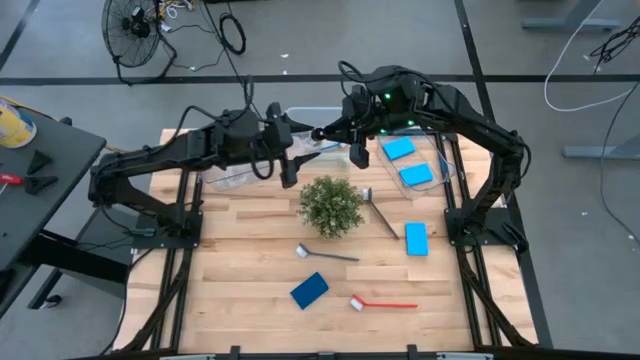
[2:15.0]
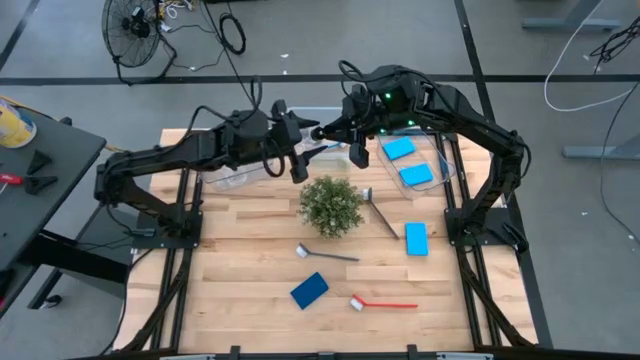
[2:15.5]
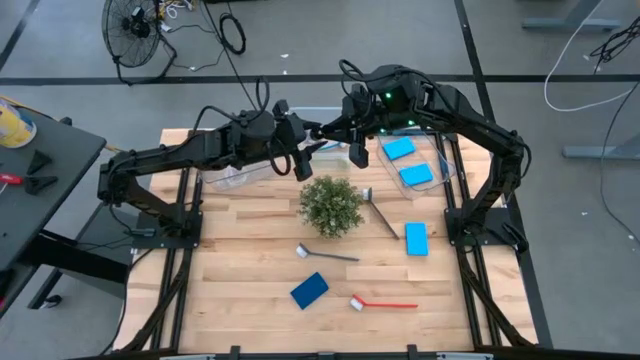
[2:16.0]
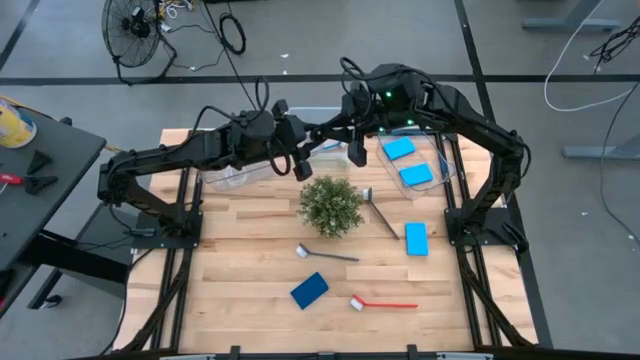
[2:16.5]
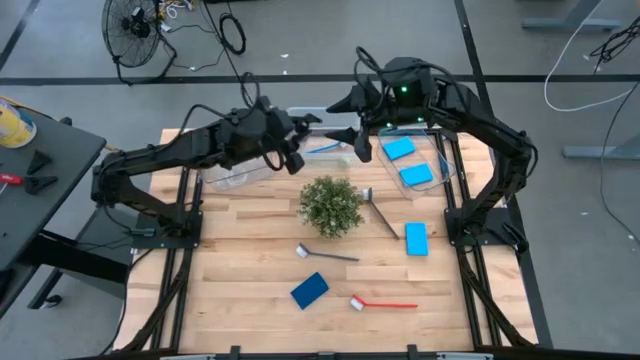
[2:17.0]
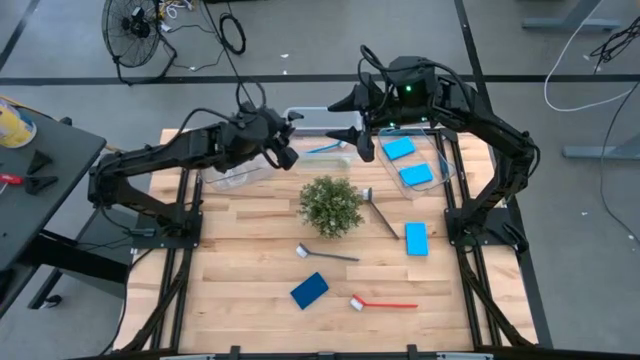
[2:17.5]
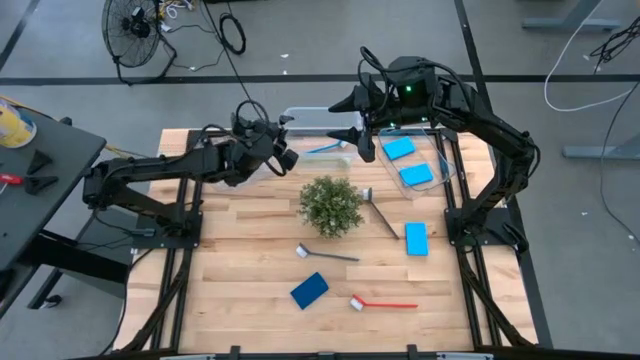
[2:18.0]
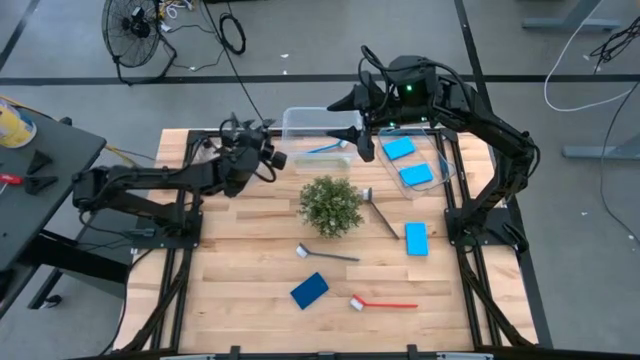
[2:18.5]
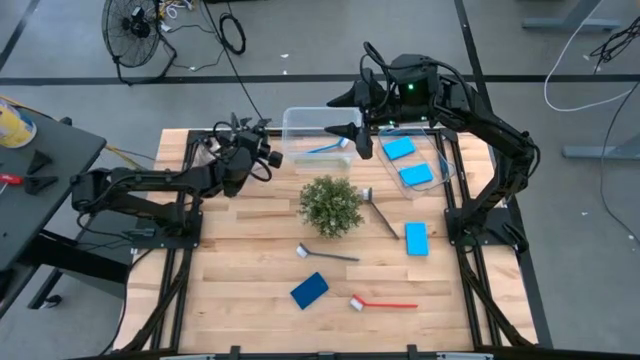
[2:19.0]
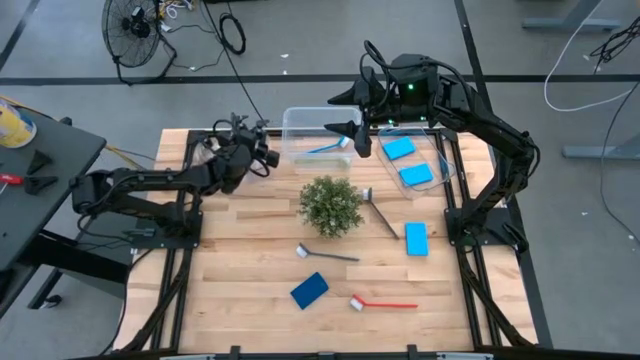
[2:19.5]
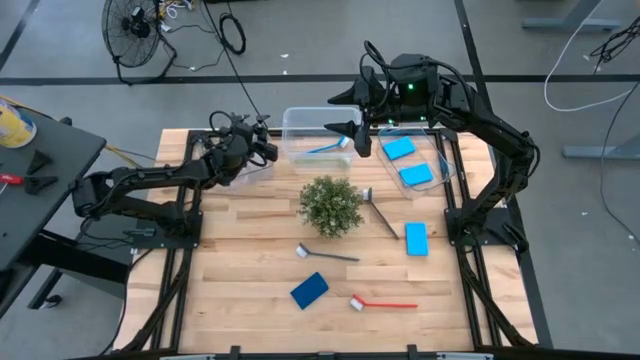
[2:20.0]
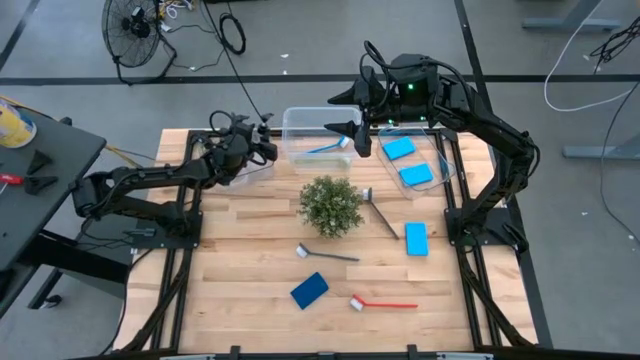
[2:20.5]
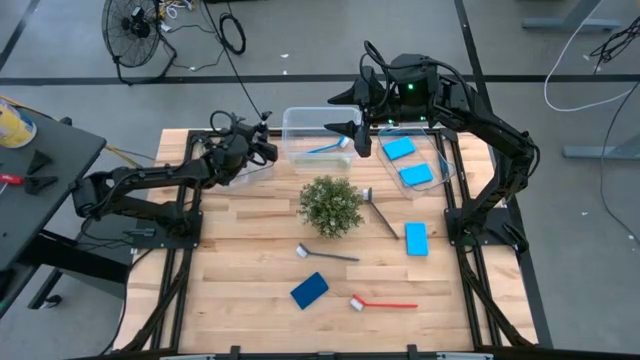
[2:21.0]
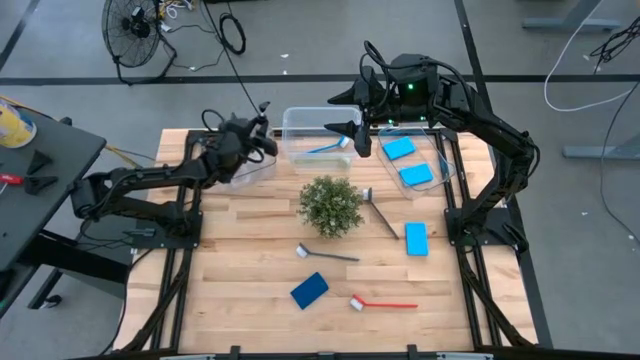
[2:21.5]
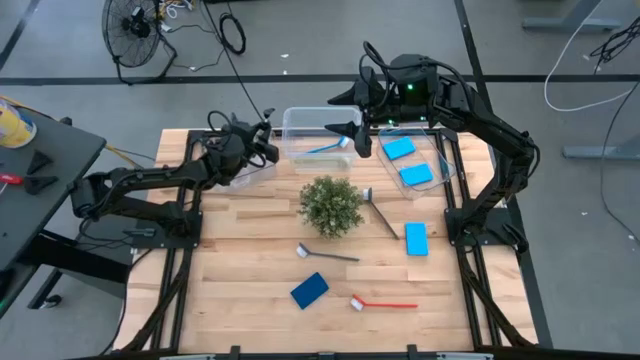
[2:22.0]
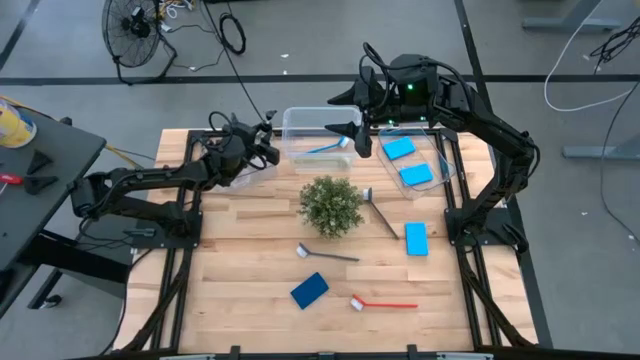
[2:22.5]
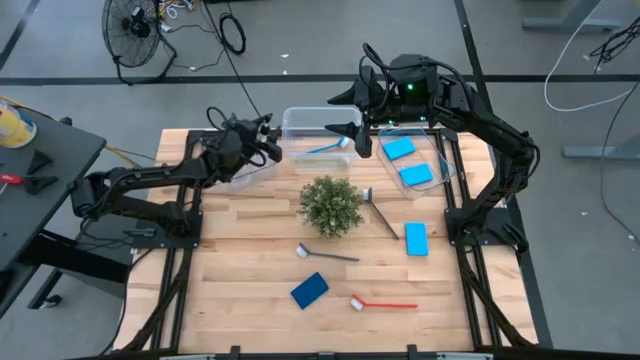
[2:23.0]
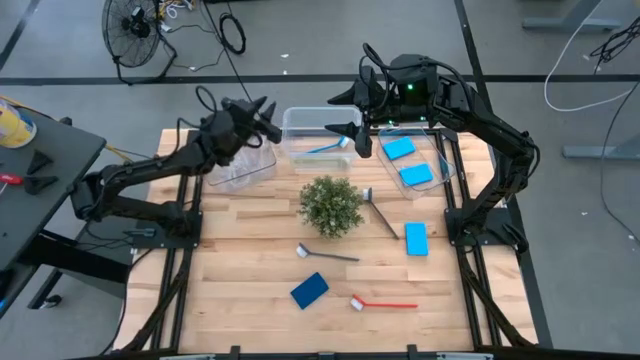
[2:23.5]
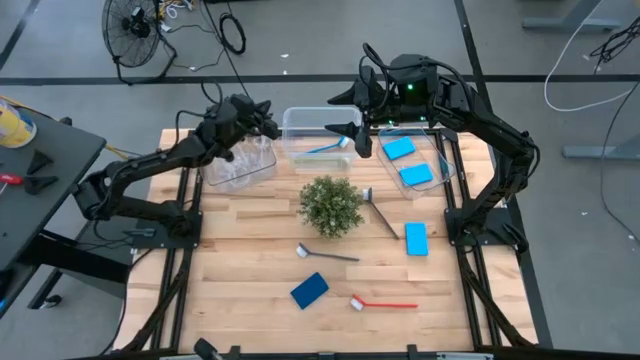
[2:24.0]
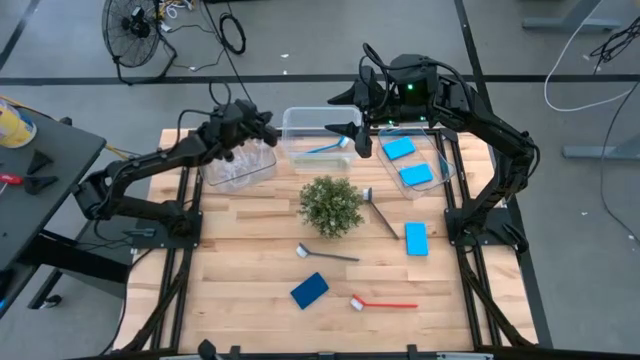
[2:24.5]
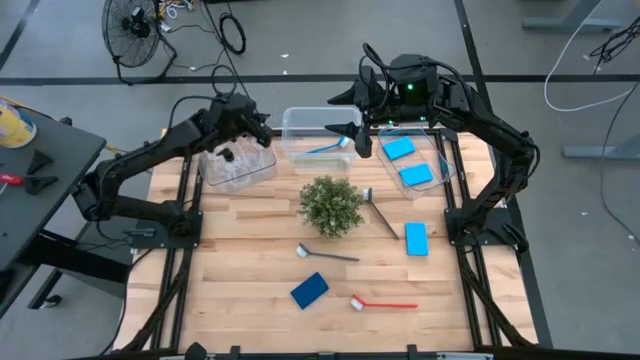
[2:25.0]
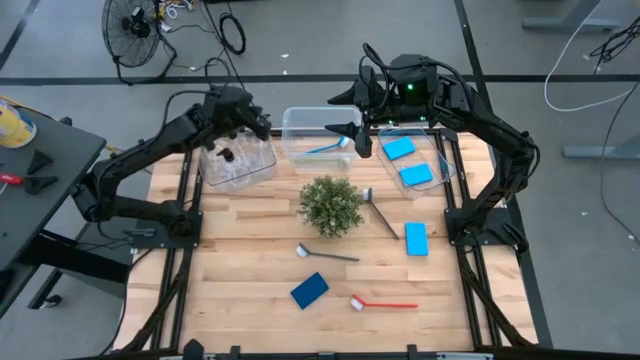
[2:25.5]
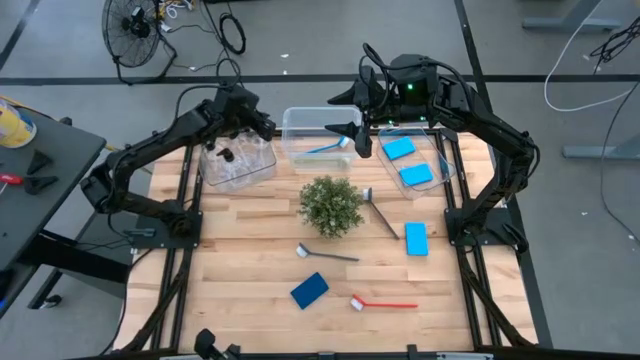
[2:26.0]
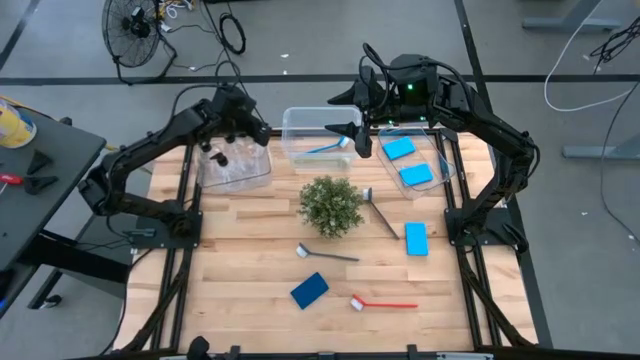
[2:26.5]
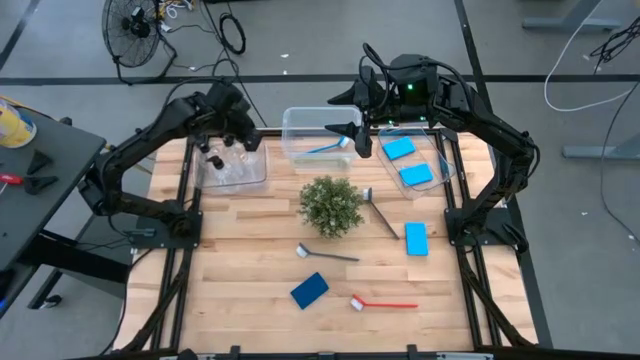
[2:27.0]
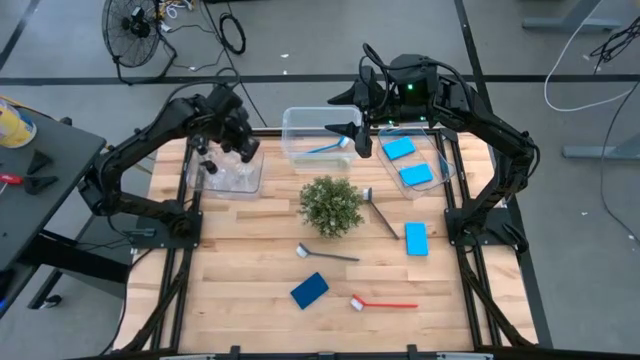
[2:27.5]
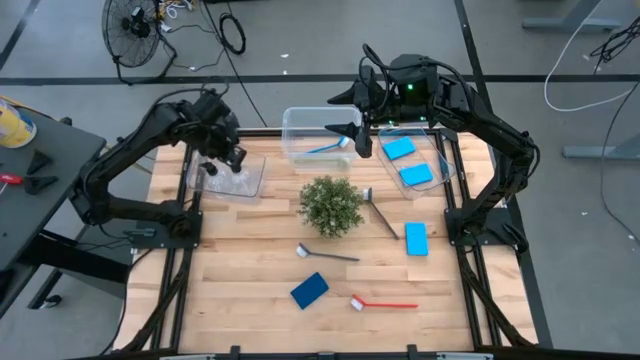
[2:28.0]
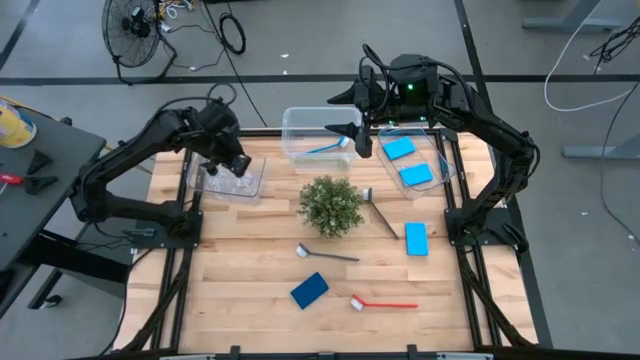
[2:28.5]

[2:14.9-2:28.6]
Task: Pick & Place Kitchen Sink Supplies
Put the transparent soap dispenser into the left transparent bin

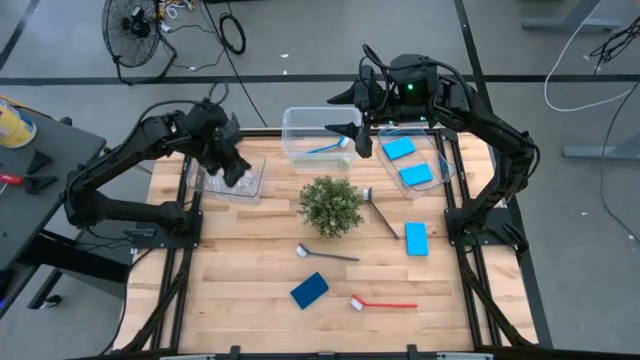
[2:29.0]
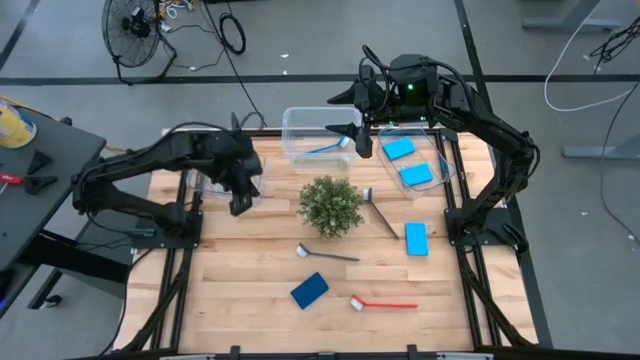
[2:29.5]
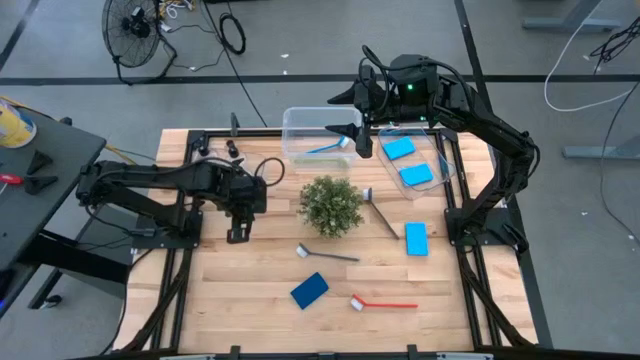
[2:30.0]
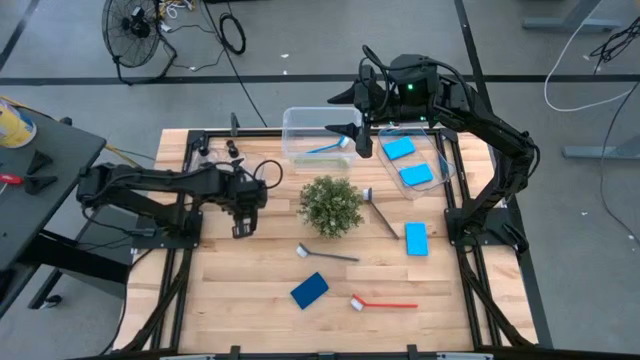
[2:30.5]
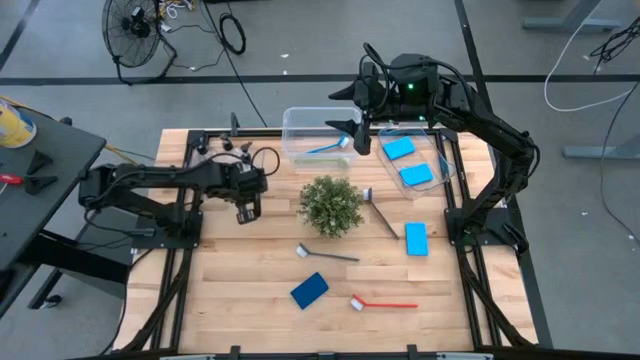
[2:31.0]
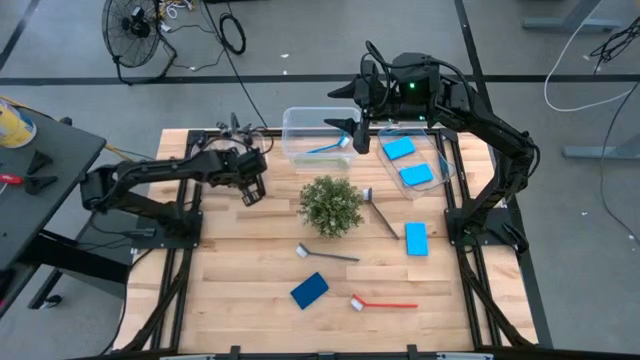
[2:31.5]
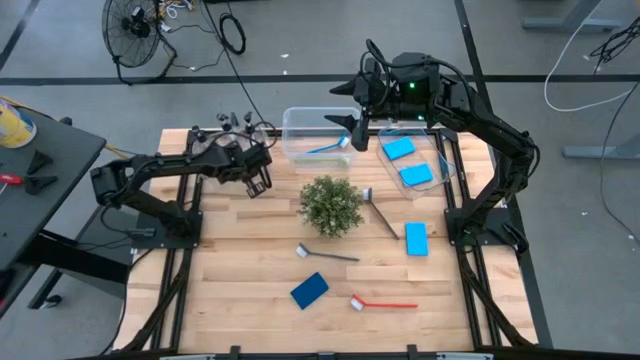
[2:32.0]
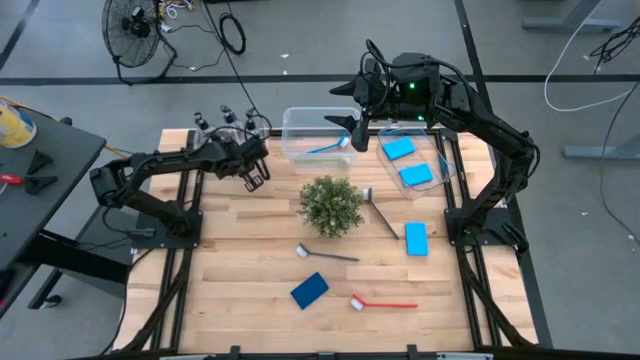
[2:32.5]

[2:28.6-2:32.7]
Adjust the left transparent bin

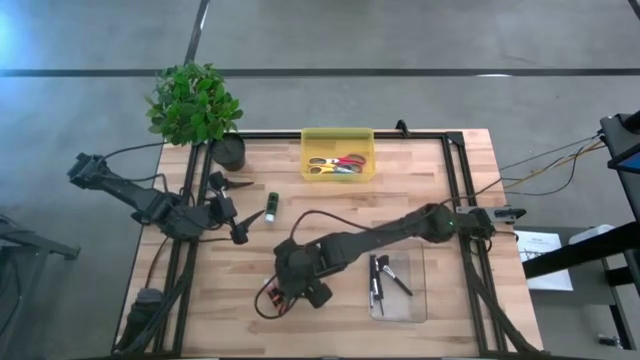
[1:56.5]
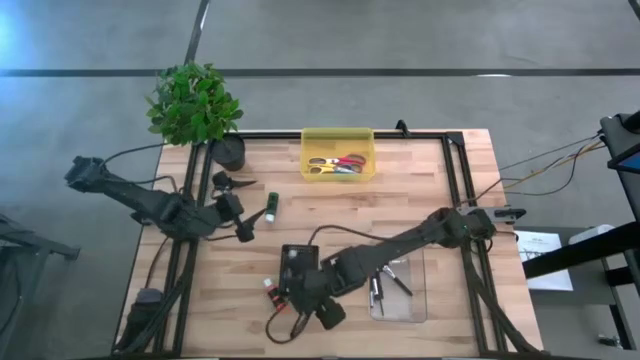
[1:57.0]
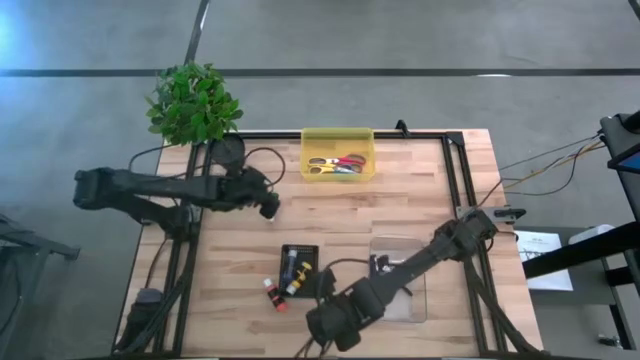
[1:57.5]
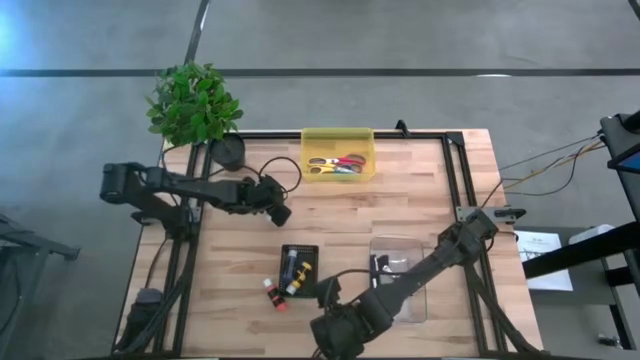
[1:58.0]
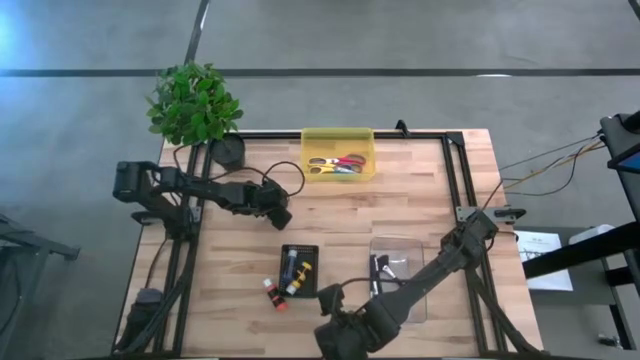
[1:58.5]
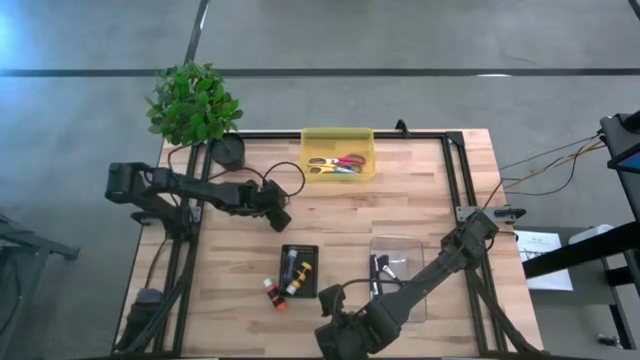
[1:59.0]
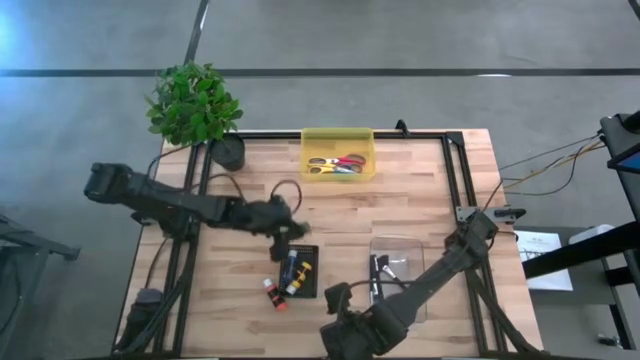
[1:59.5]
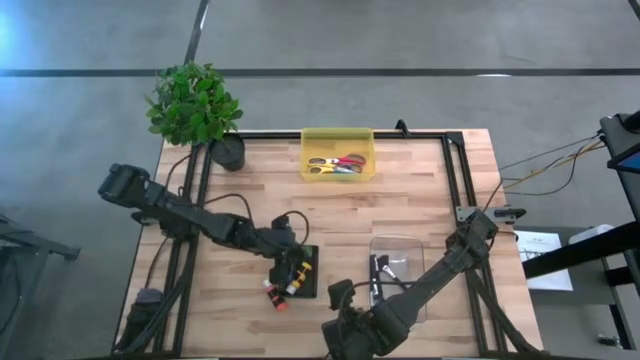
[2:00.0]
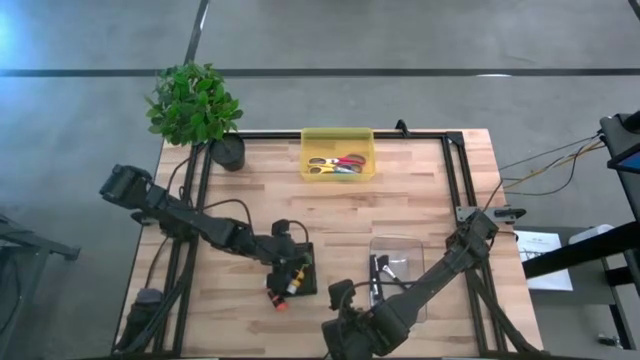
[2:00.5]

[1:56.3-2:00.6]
Task: Pick & Place Paint Supplies
Put the green paint bottle into the black bin
